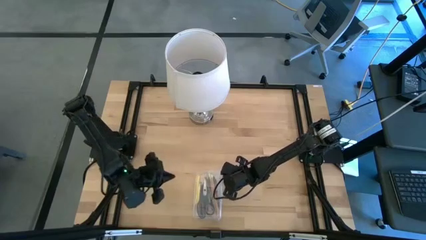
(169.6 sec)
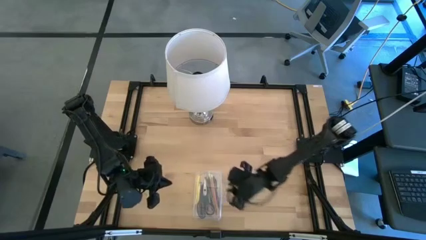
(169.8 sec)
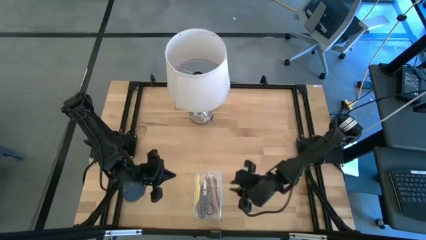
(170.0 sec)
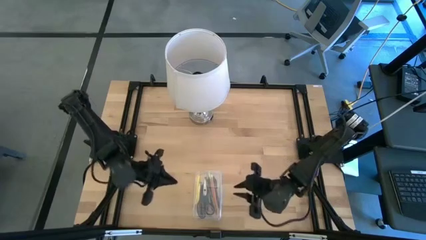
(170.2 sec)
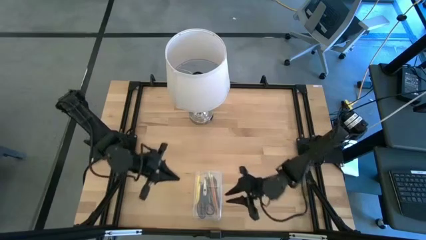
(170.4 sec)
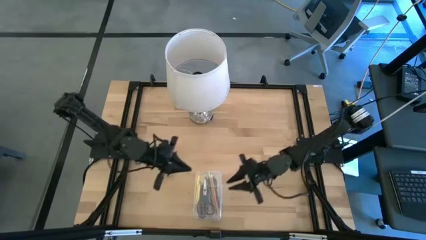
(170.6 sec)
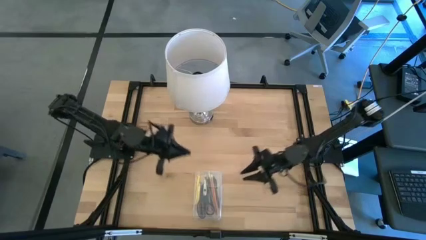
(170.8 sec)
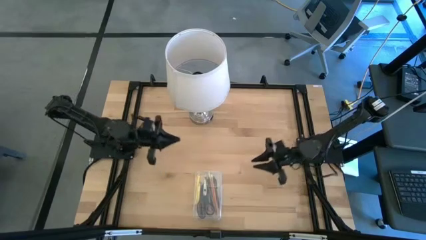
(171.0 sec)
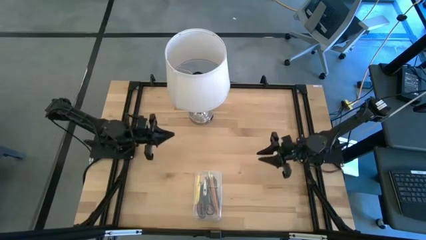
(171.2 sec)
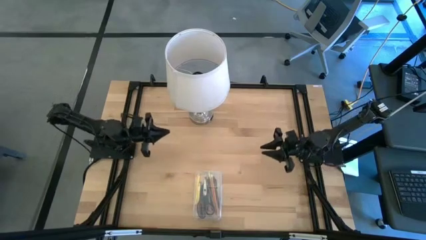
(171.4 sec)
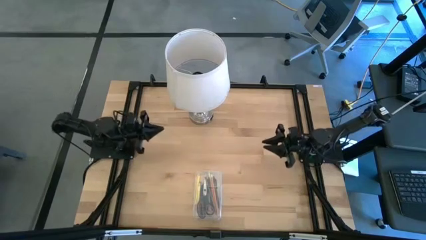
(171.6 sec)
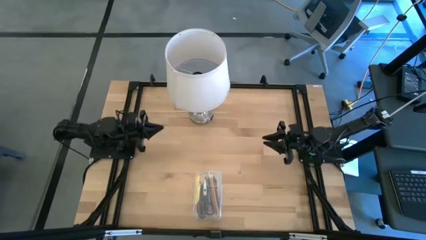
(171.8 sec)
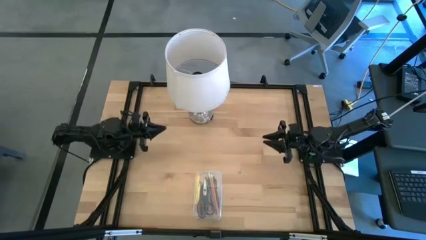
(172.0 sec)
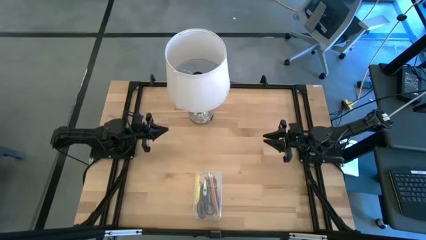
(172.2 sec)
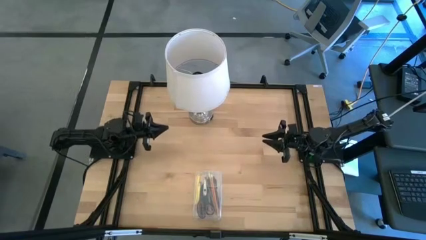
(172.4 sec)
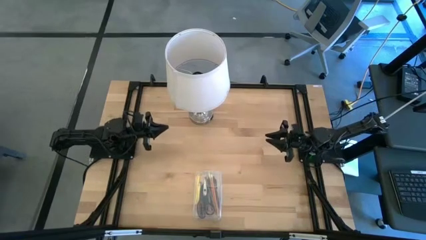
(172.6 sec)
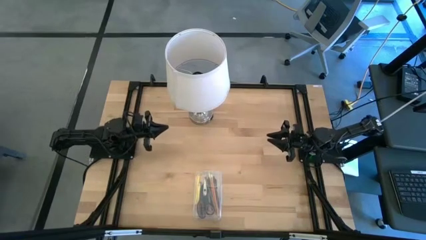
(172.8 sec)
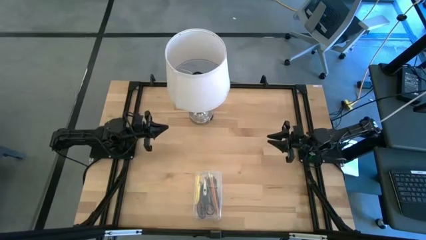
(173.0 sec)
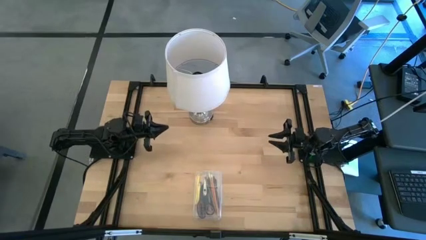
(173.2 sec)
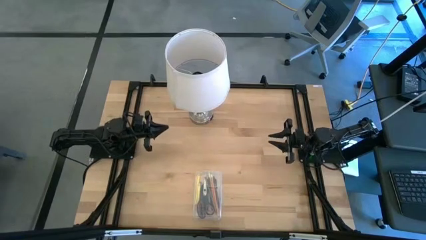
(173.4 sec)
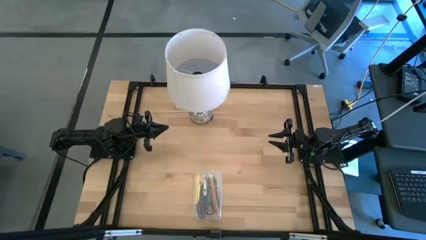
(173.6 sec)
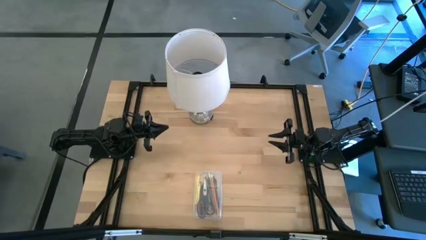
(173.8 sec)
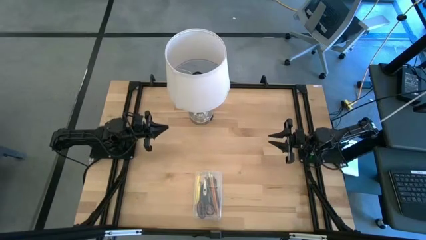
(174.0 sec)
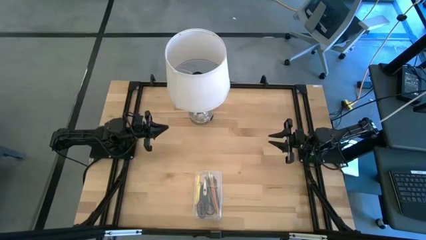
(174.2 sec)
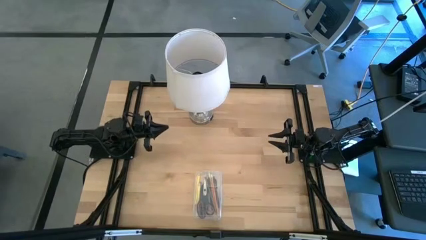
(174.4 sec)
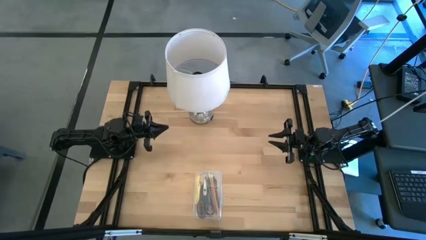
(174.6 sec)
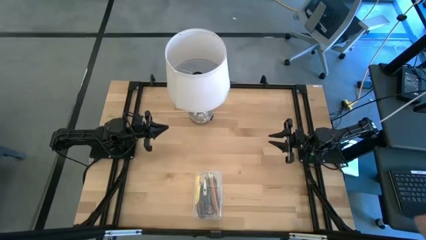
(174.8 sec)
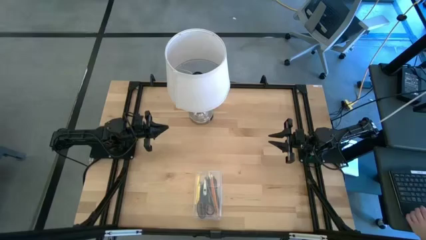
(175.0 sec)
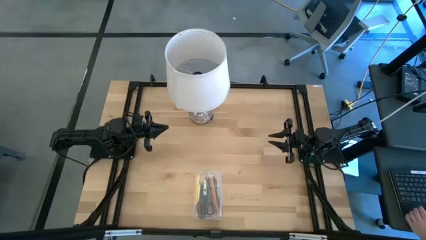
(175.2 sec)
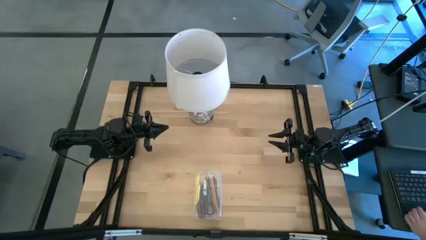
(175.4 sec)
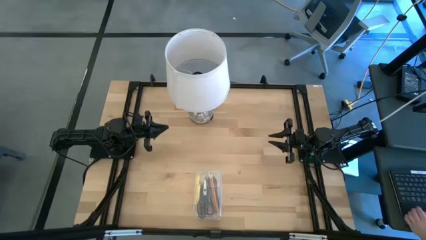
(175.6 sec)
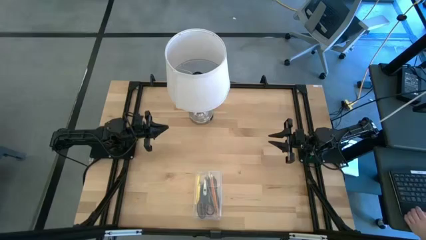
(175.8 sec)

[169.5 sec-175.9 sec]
Task: Pick & place school supplies into a supply box
Return to Home Position

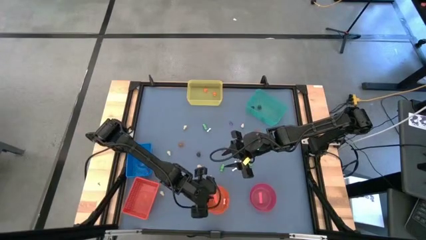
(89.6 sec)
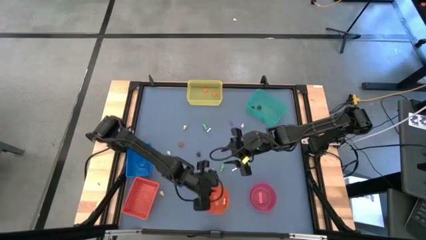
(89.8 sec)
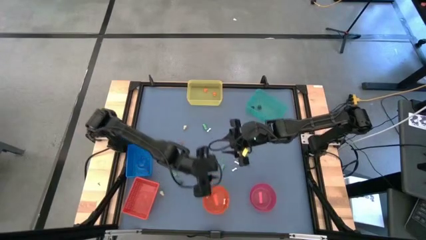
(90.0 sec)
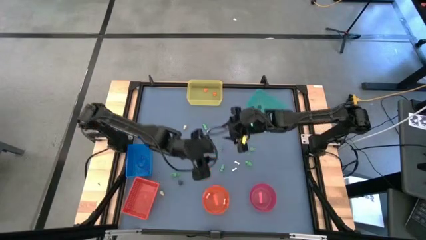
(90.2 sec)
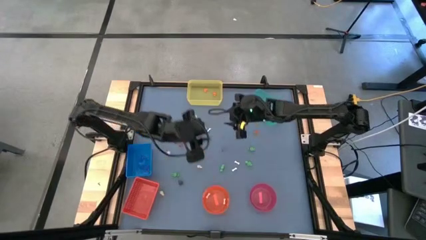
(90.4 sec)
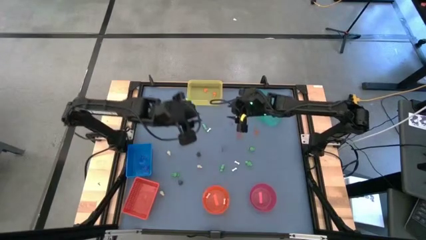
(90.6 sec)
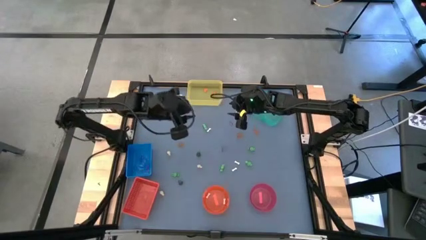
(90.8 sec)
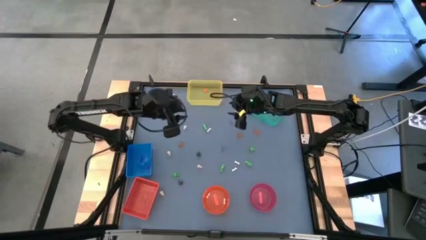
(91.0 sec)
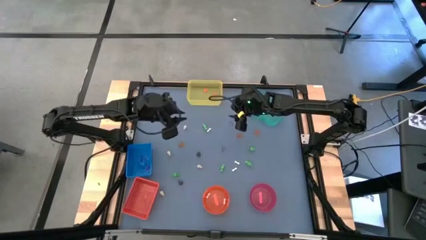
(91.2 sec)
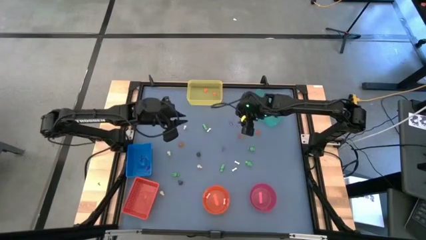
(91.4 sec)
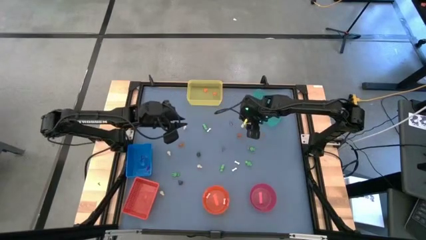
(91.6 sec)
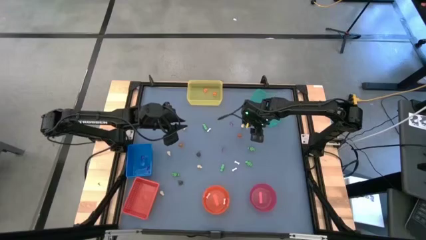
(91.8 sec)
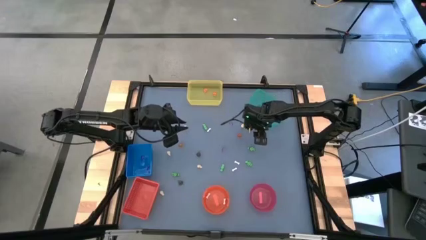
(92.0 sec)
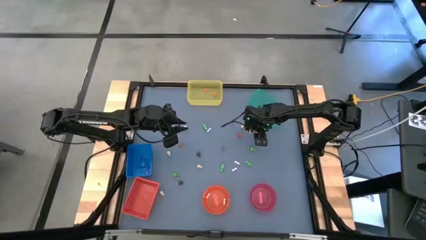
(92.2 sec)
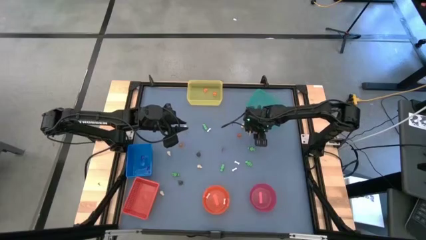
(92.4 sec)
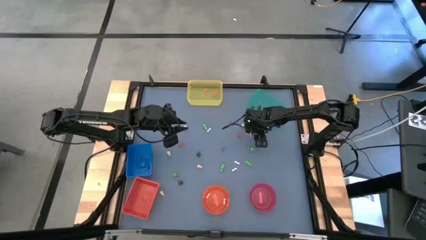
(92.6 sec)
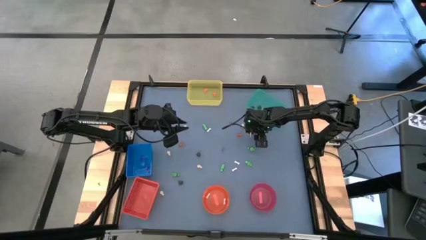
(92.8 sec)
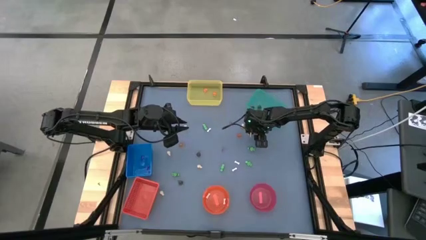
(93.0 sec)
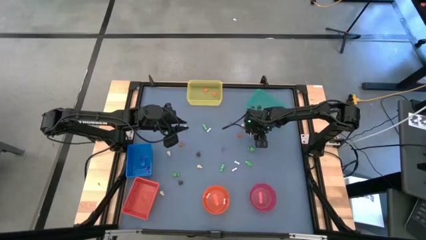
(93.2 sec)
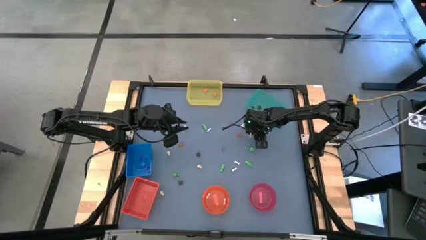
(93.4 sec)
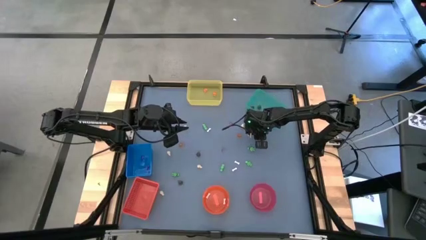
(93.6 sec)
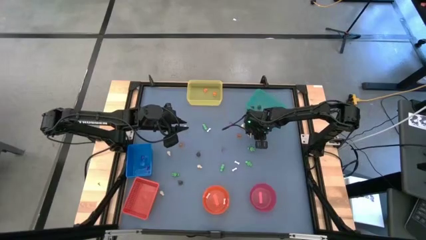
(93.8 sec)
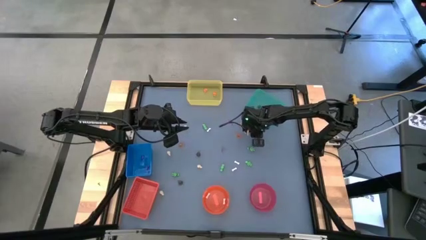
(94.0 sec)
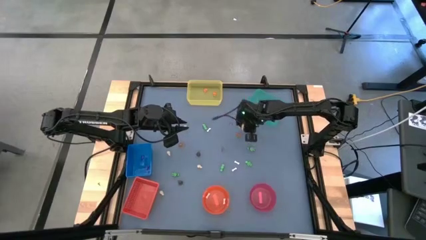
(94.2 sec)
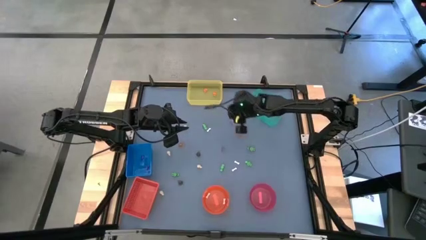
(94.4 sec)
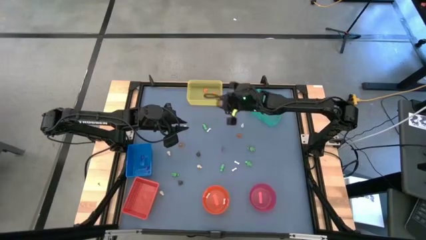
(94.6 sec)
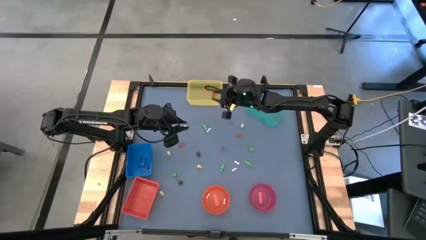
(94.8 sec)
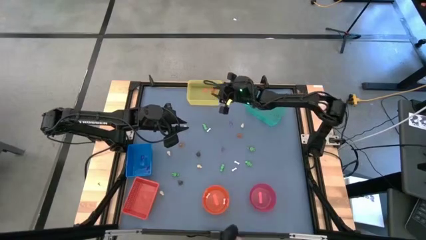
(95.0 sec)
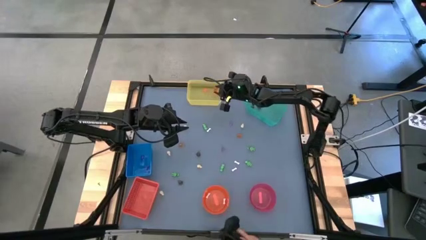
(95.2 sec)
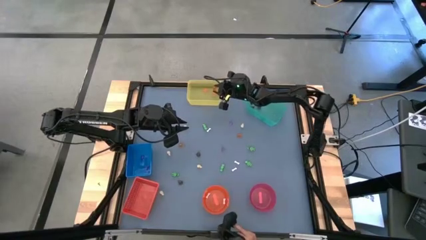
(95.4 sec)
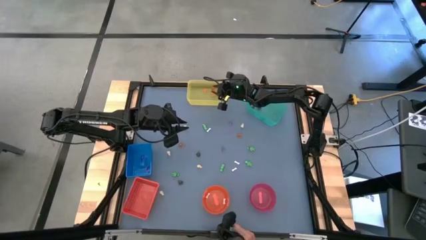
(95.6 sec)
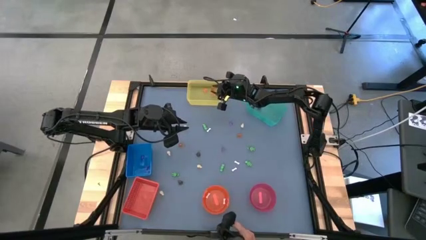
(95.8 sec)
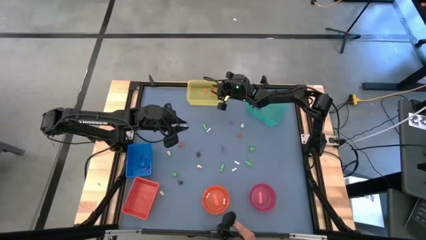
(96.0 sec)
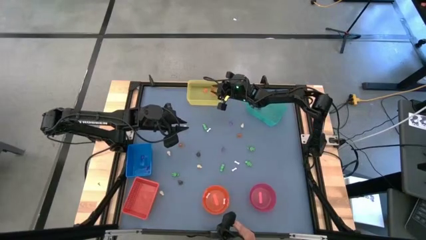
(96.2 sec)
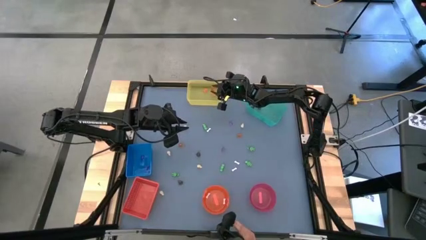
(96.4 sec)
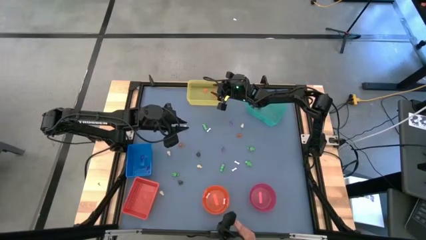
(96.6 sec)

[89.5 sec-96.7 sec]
Task: Sort Halloween decoration
Put the orange pumpkin toy into the yellow bin

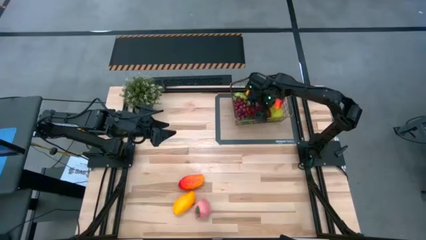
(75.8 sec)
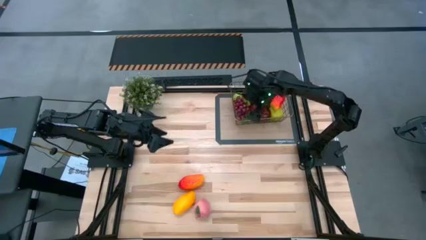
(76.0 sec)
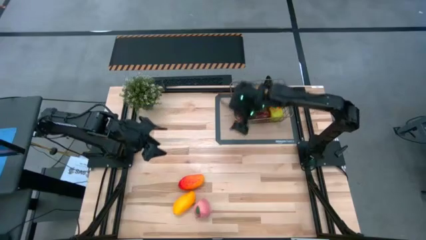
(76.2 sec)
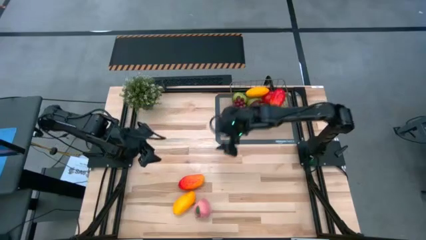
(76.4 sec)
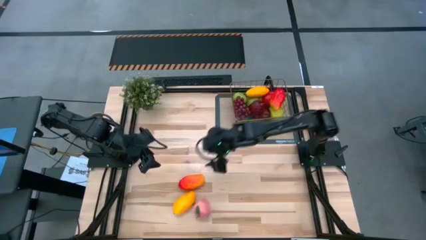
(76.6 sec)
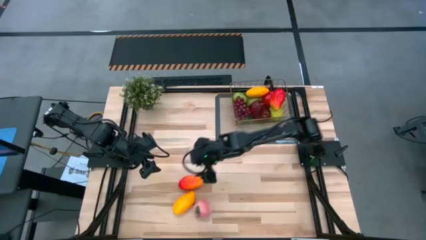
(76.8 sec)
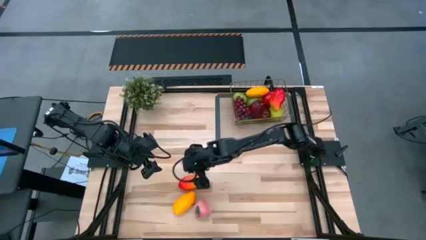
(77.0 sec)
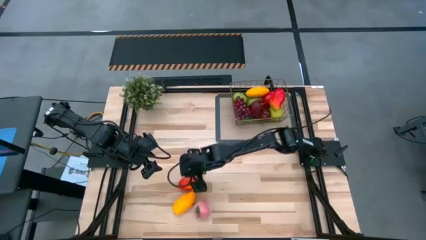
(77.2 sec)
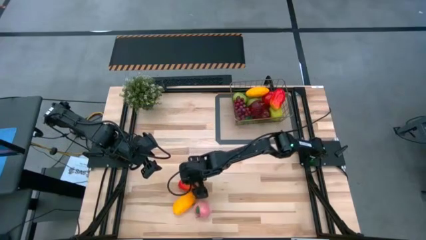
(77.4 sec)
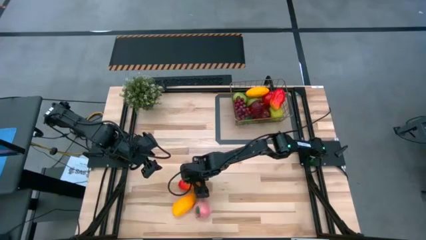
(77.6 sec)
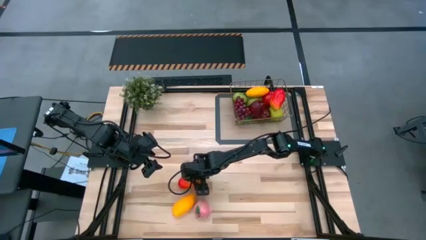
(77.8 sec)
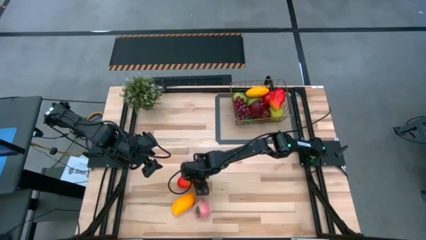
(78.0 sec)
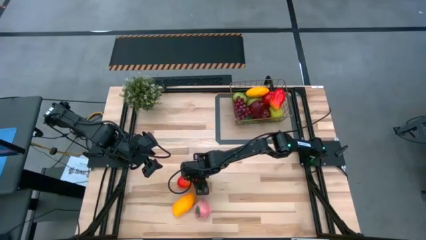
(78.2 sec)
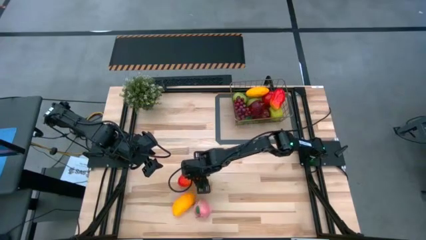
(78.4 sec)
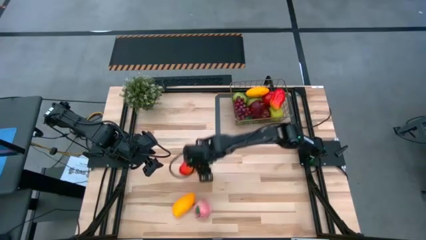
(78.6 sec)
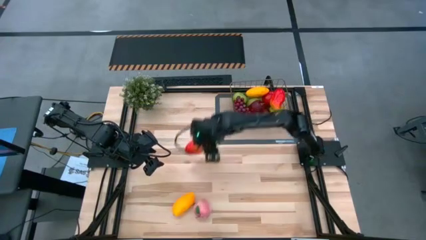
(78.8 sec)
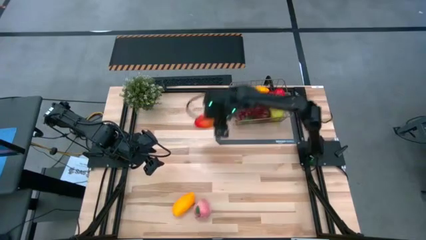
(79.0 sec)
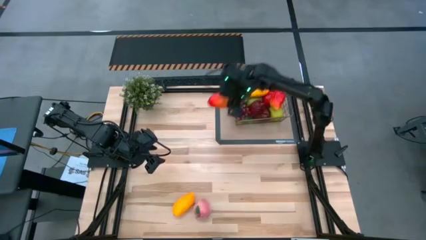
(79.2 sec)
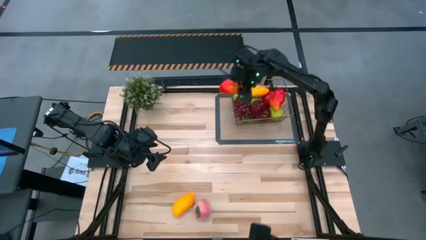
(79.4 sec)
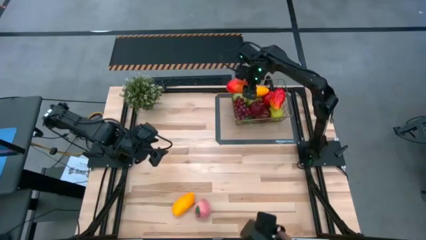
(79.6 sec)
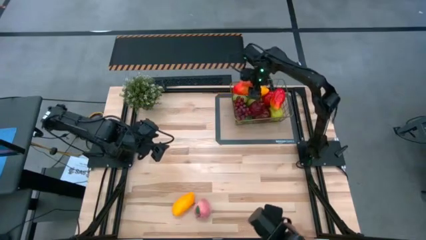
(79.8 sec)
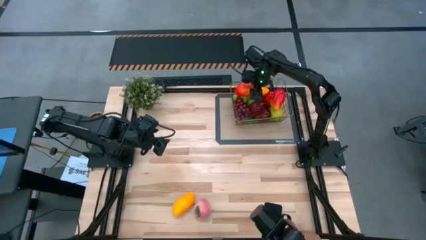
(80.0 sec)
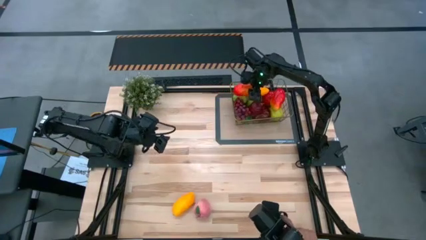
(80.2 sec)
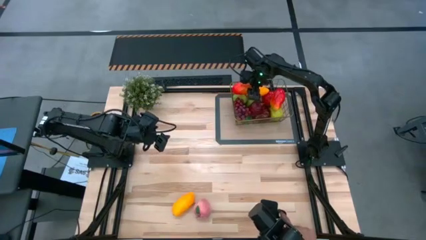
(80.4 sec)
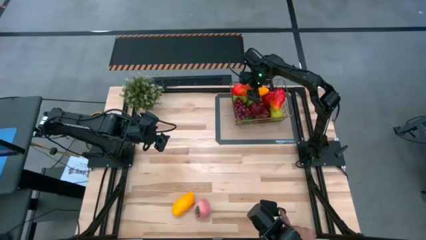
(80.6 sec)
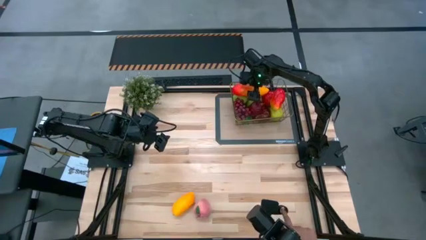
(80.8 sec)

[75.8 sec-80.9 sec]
Task: Build produce basket
Put the red mango into the gold wire basket
